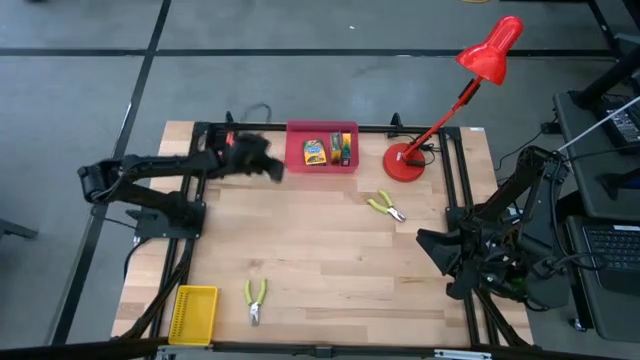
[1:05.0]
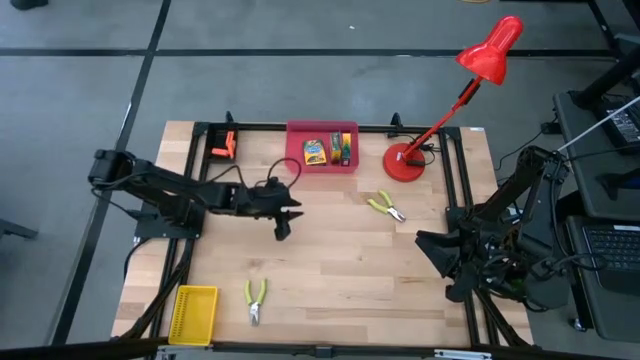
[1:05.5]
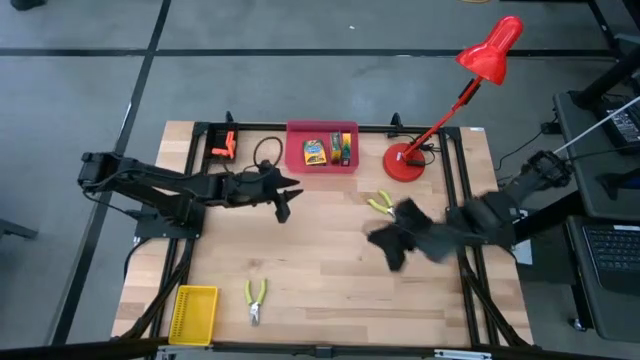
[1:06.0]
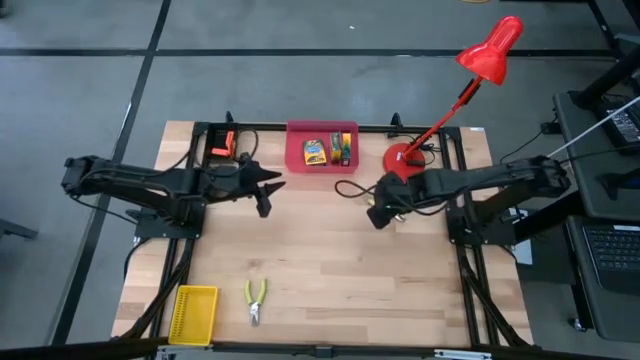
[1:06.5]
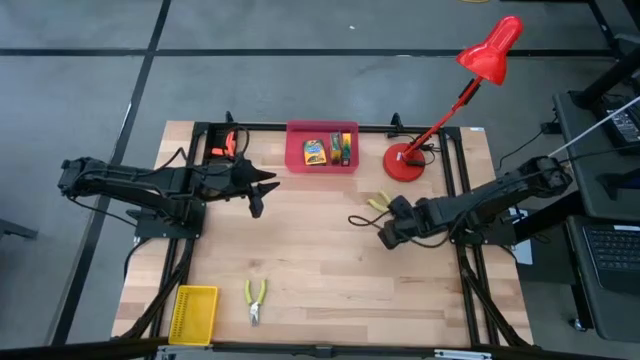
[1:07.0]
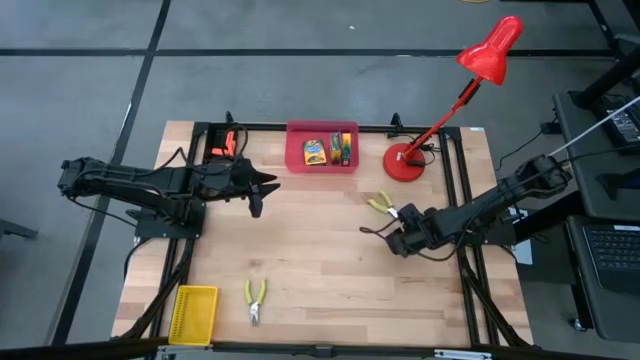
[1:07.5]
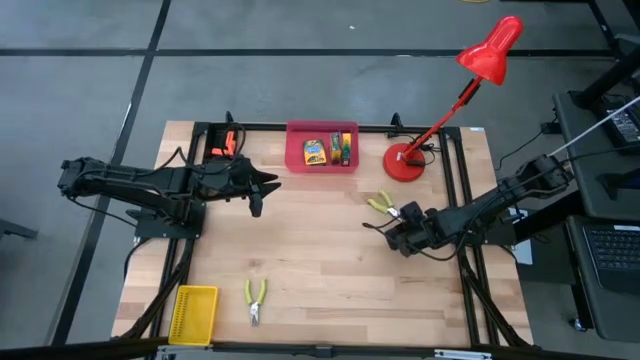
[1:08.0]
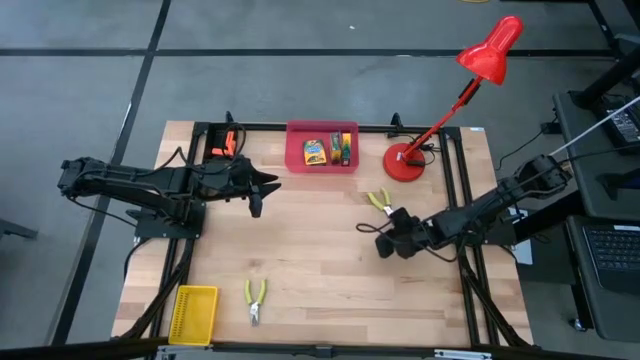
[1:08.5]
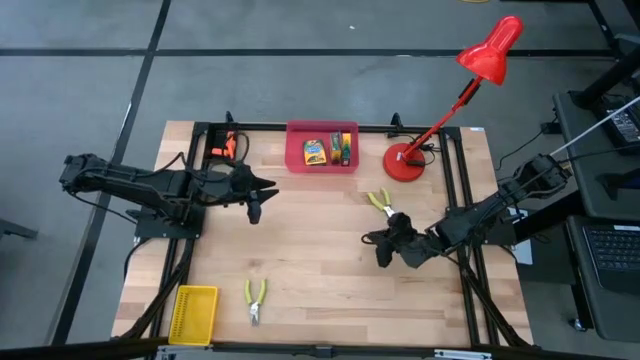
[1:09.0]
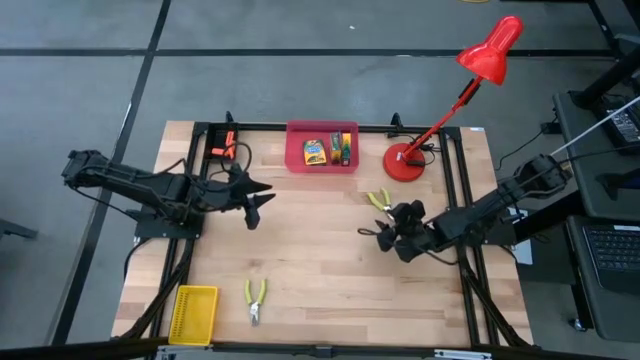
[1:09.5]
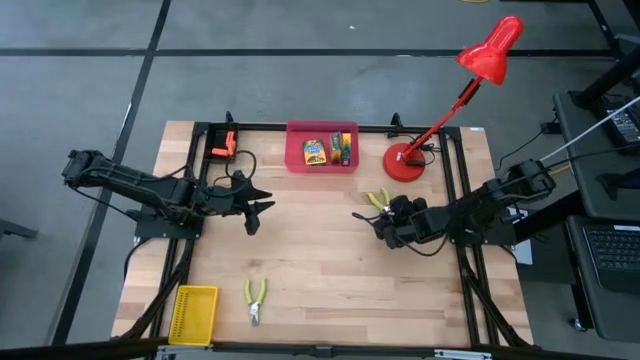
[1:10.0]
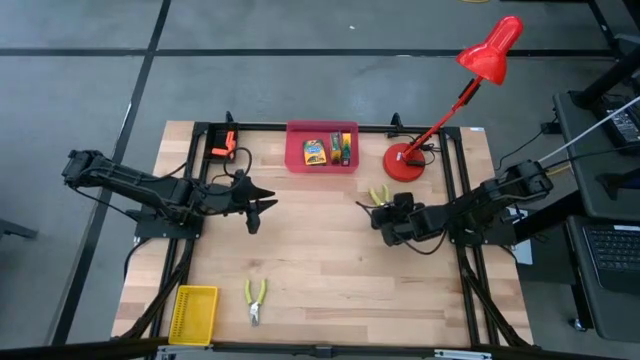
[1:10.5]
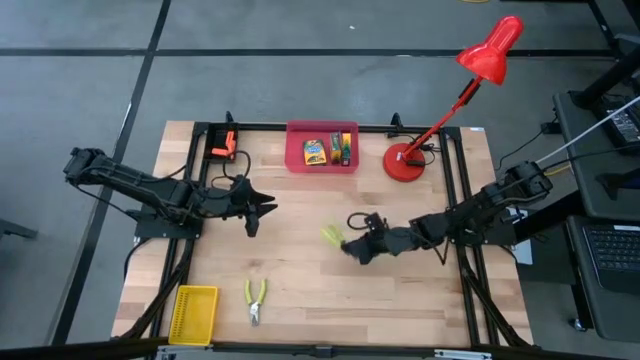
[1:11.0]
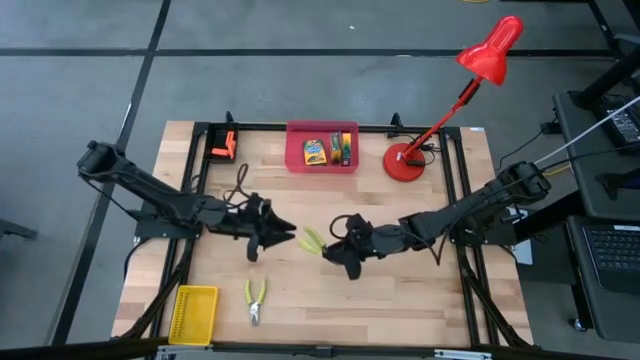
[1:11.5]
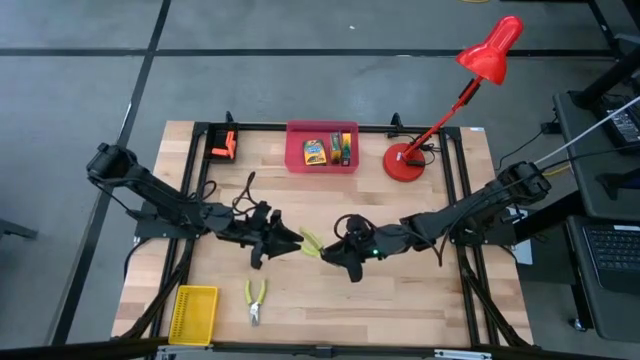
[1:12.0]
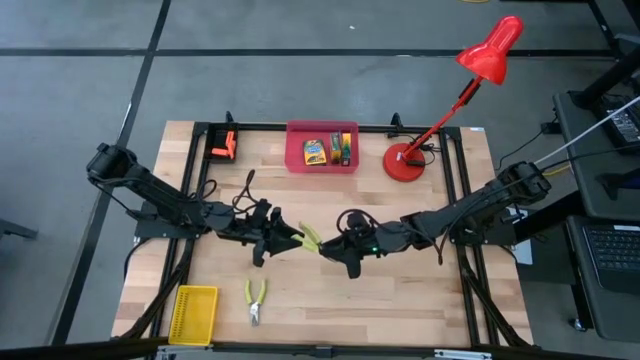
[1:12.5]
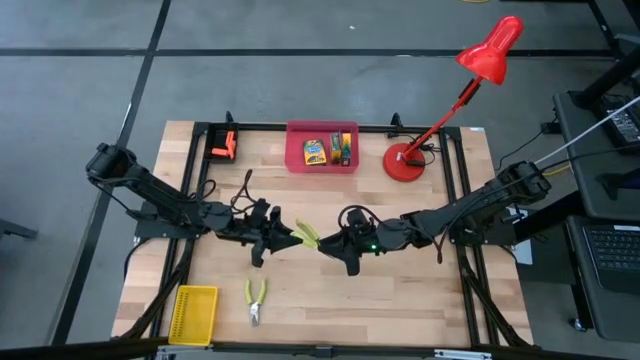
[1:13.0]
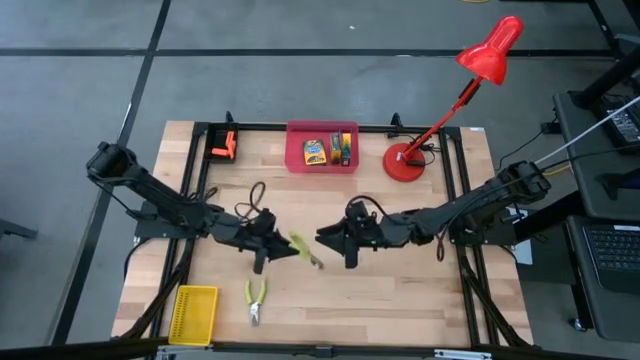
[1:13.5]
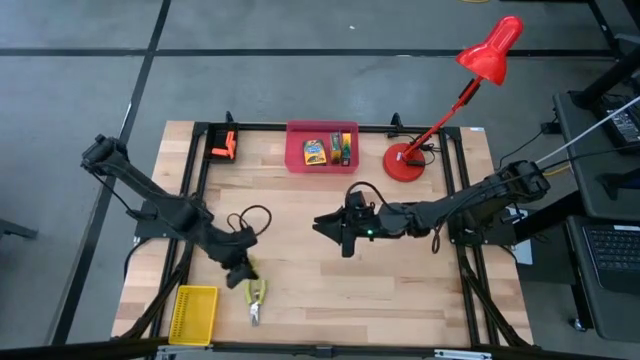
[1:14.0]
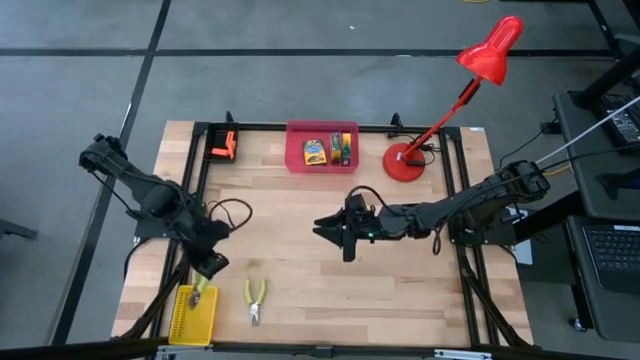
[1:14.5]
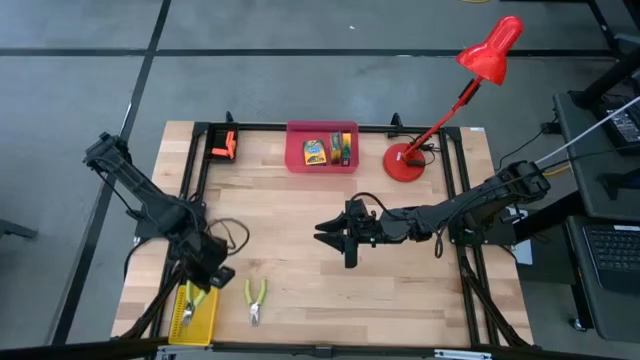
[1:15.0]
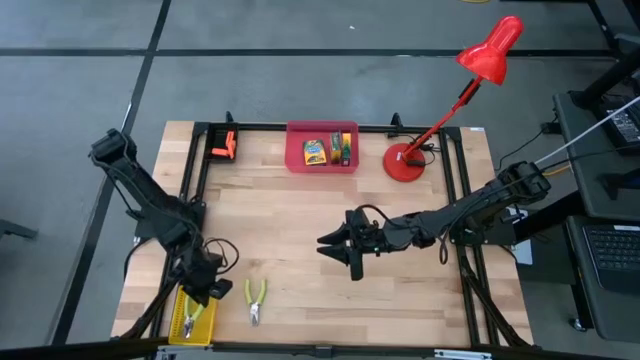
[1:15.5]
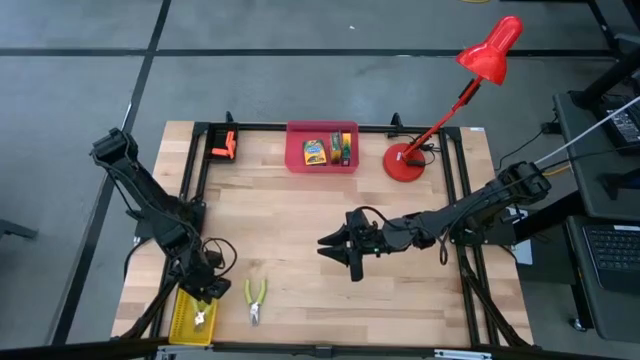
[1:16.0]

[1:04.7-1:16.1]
Task: Pick & Place School Supplies
Put the green pliers into the yellow bin

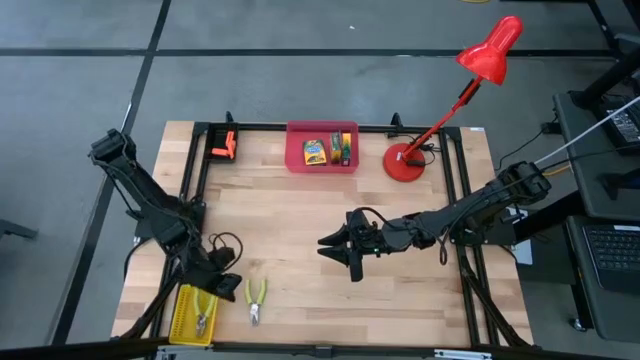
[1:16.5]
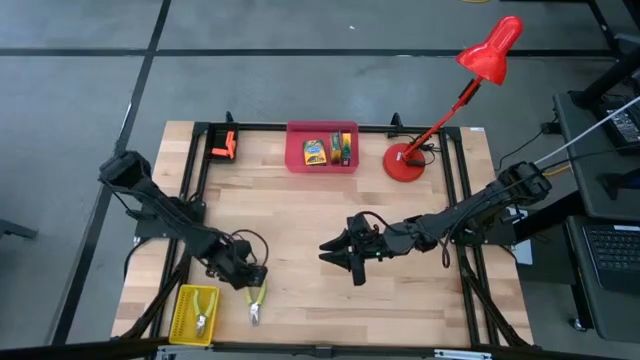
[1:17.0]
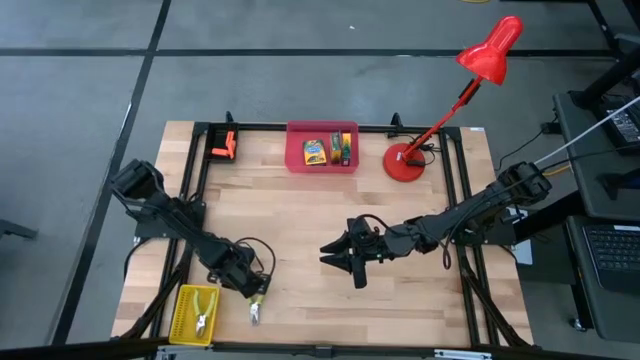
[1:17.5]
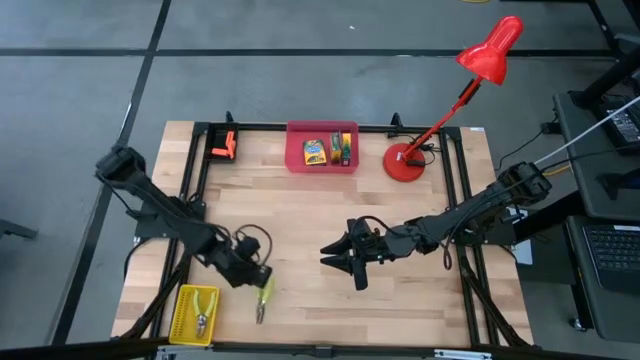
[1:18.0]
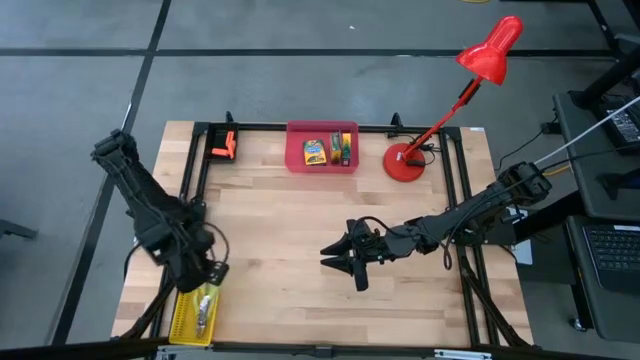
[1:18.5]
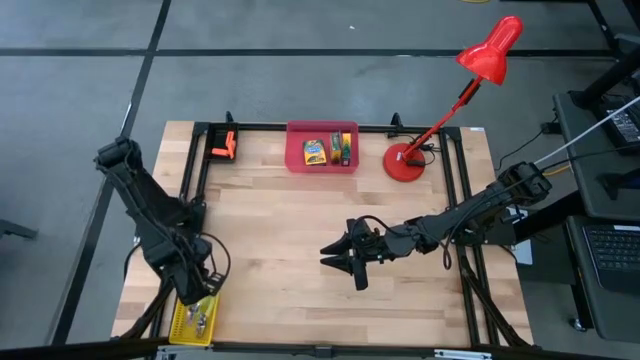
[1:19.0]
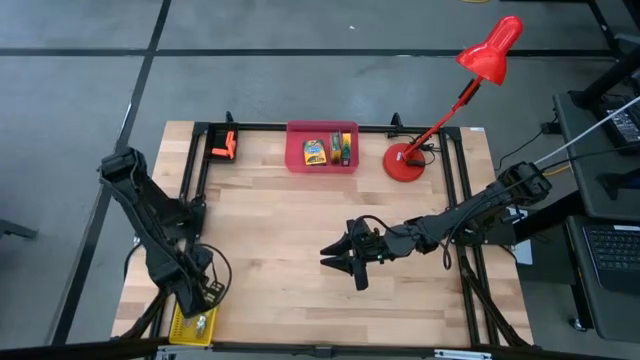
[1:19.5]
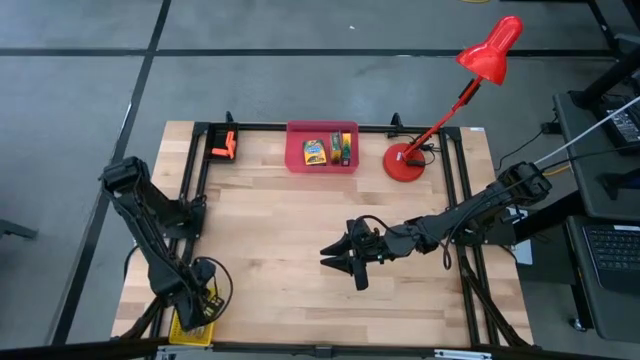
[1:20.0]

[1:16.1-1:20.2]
Put the green pliers into the yellow bin

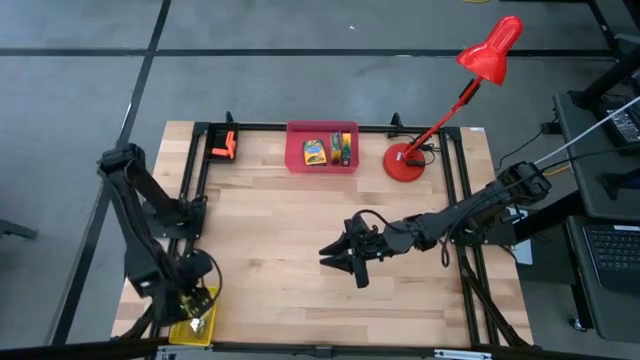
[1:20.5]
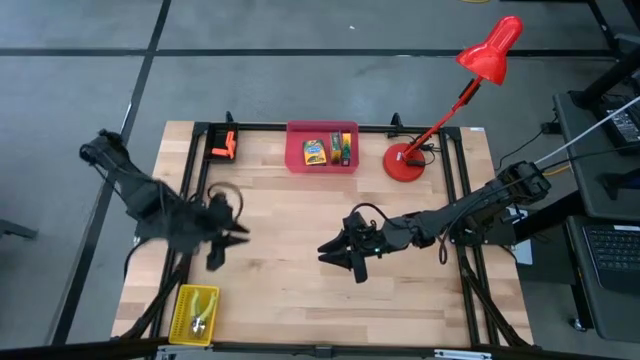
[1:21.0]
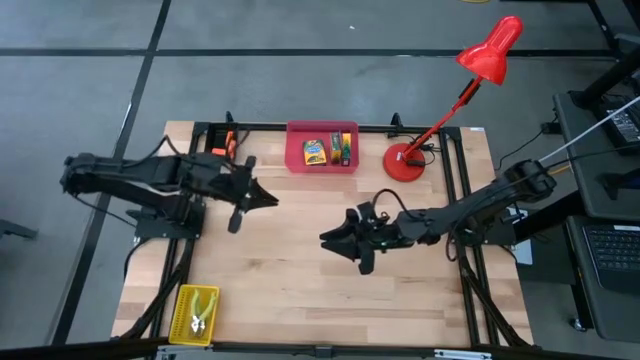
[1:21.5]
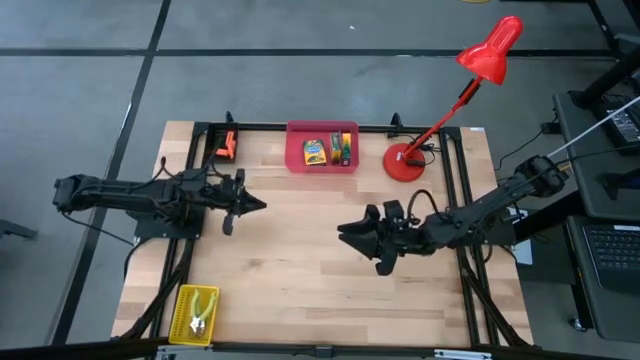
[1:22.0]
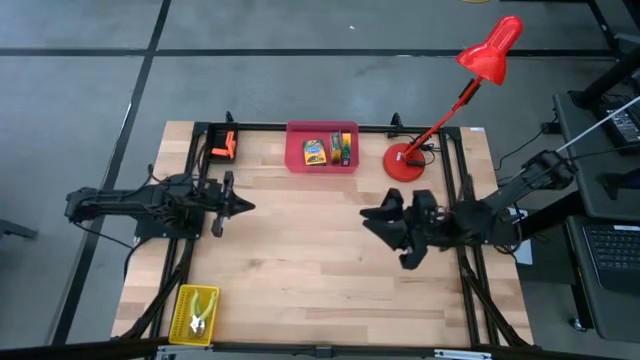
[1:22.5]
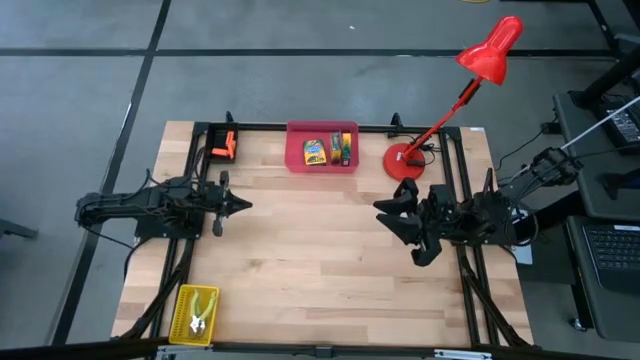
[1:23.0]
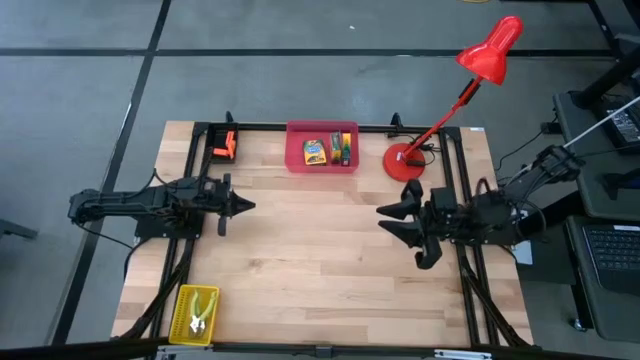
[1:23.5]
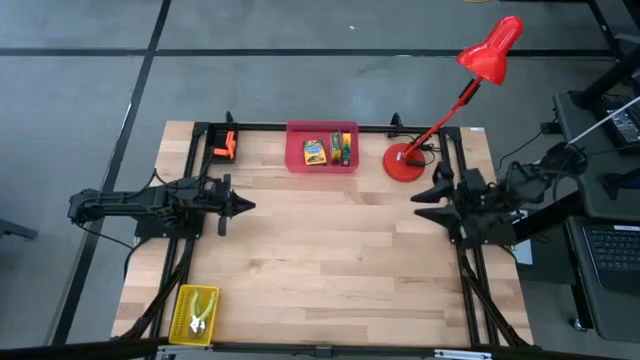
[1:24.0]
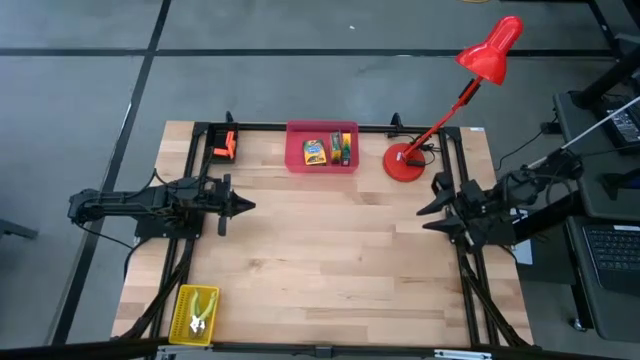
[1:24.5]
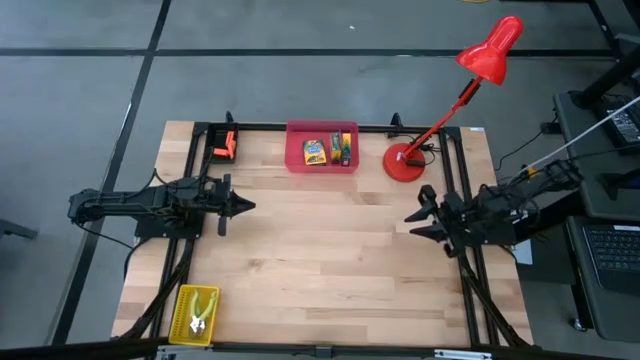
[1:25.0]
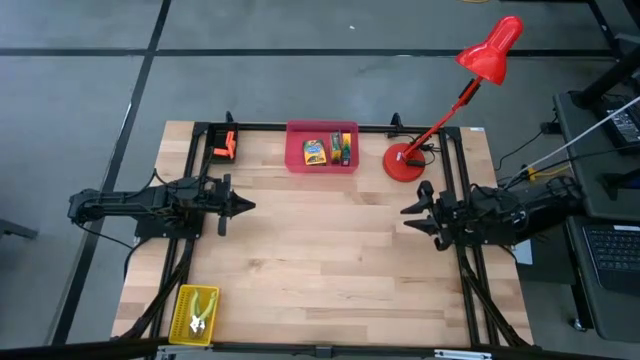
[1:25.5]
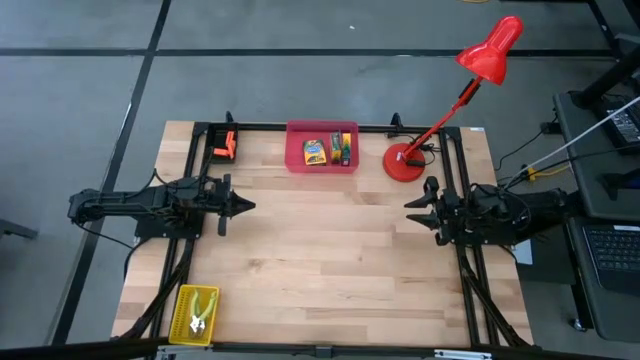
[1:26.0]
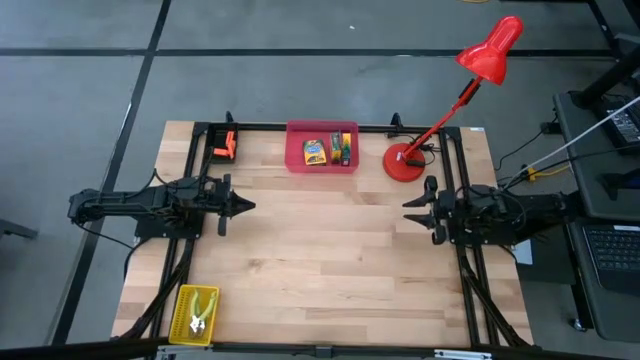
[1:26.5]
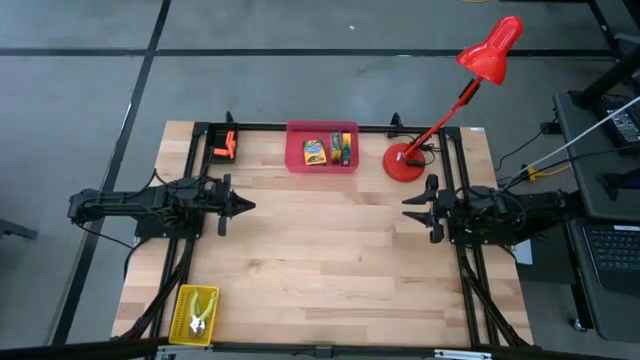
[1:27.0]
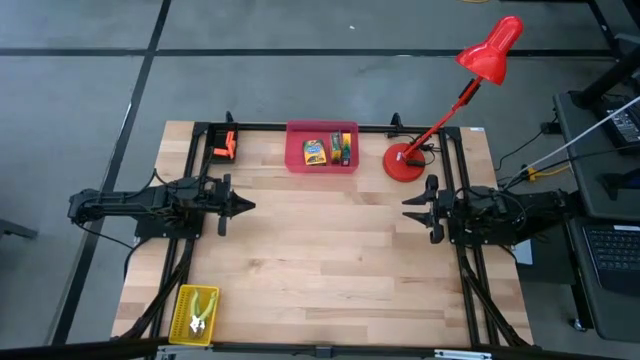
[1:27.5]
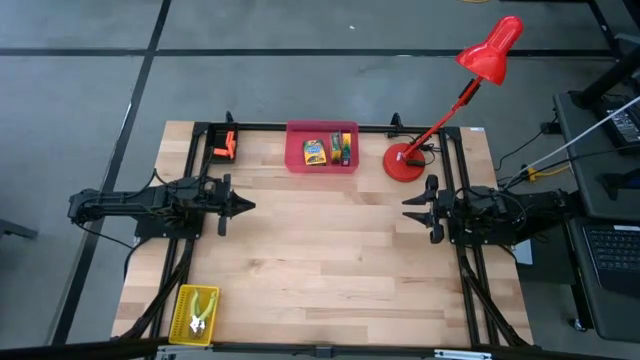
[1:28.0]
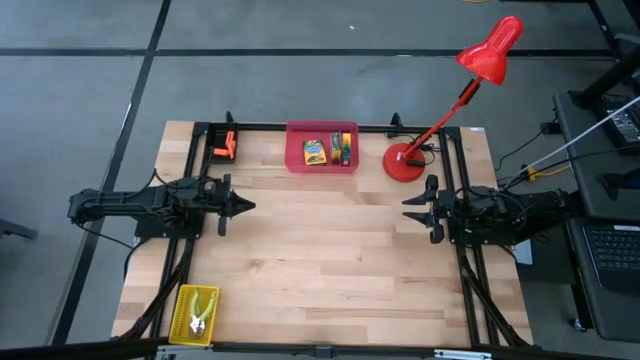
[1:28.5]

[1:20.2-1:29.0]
Return to Home Position
